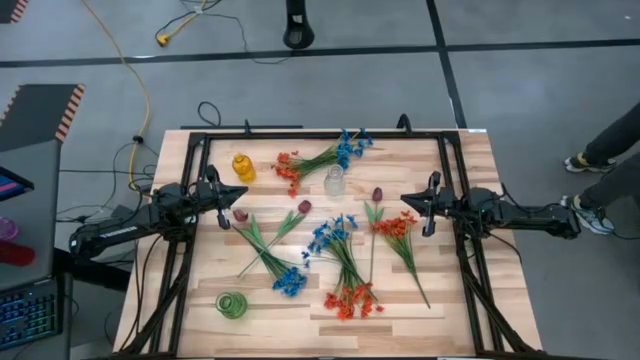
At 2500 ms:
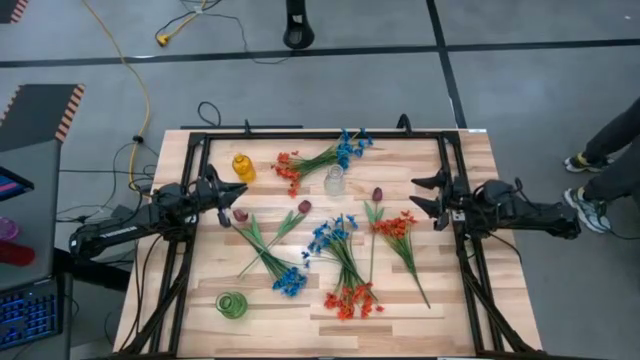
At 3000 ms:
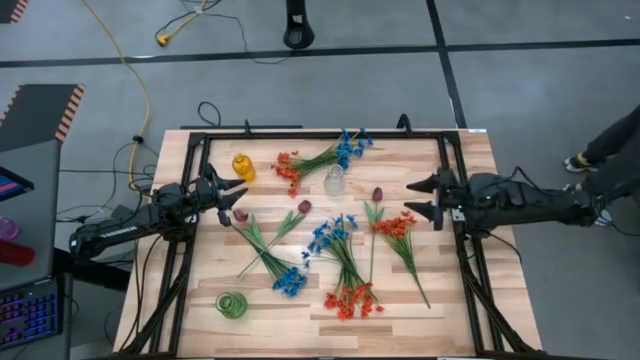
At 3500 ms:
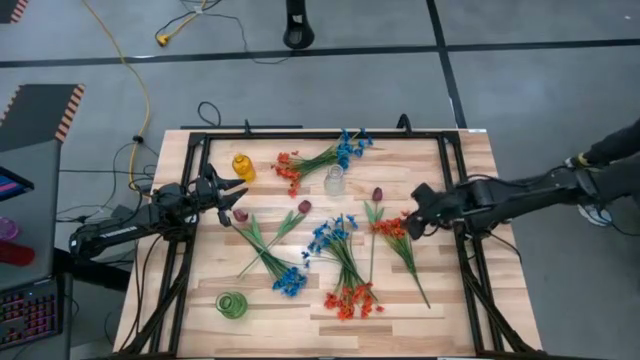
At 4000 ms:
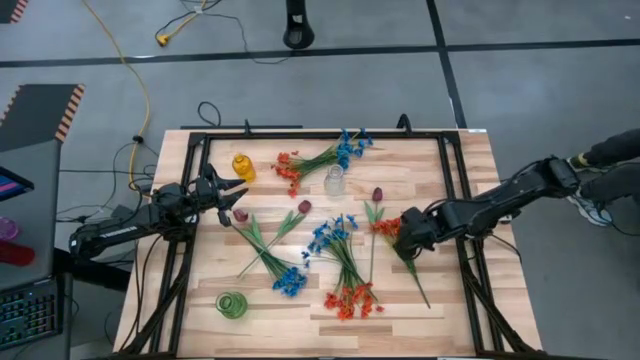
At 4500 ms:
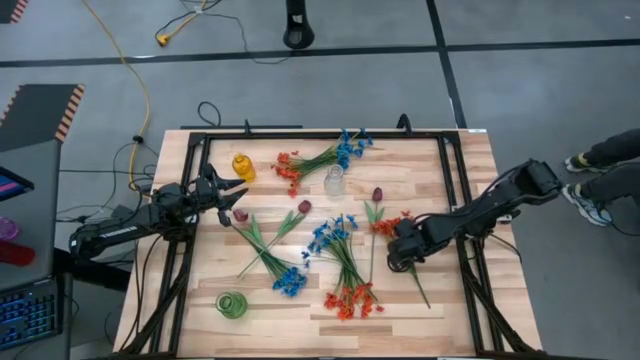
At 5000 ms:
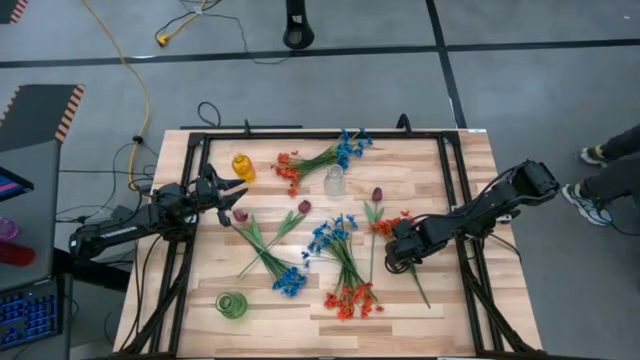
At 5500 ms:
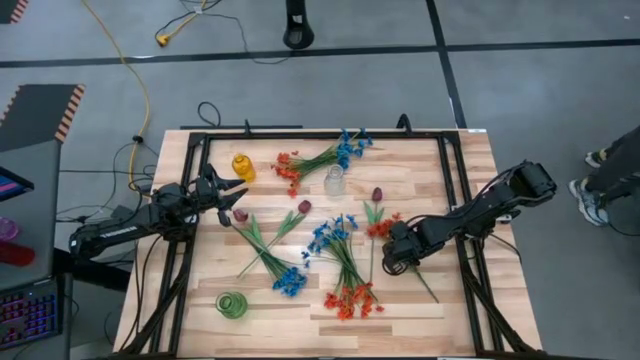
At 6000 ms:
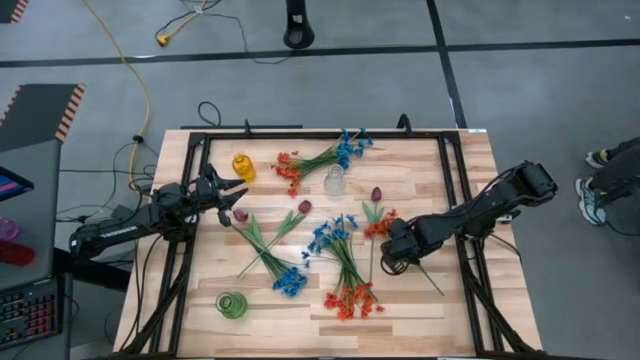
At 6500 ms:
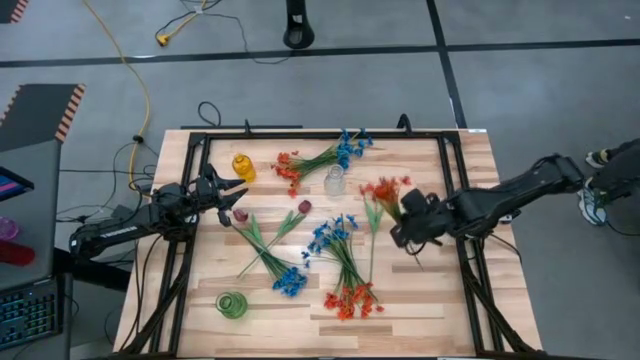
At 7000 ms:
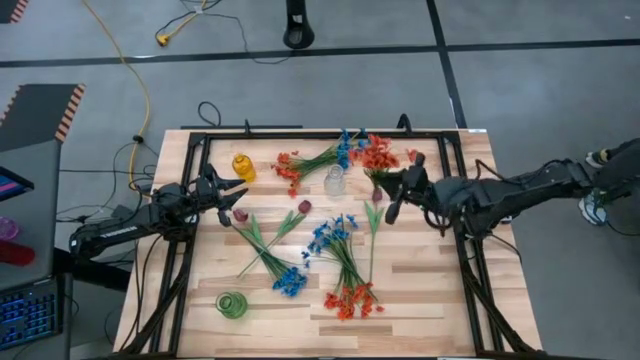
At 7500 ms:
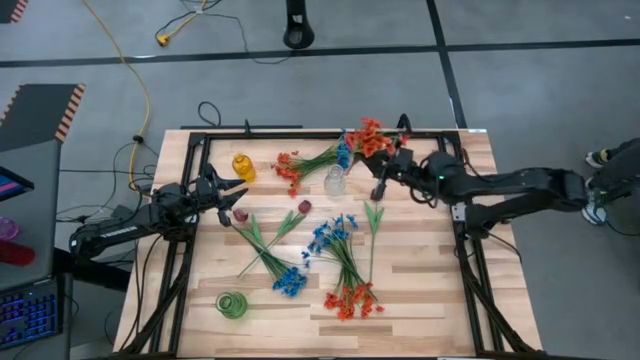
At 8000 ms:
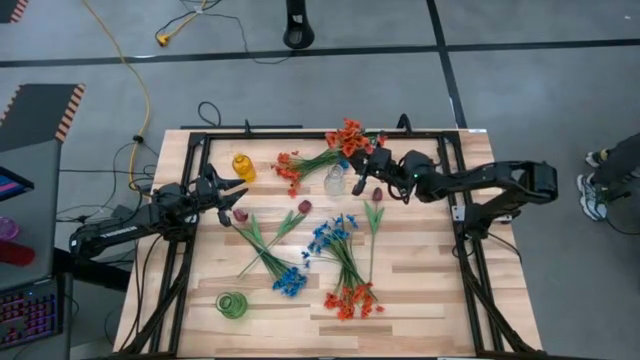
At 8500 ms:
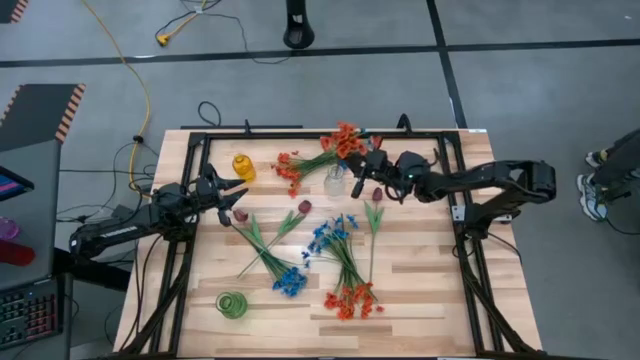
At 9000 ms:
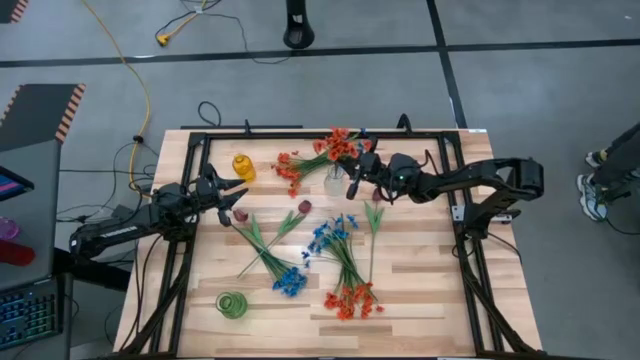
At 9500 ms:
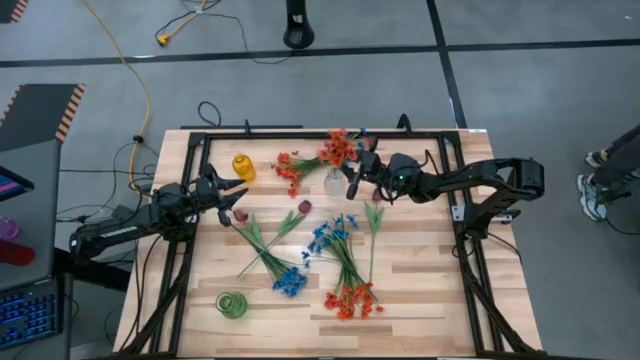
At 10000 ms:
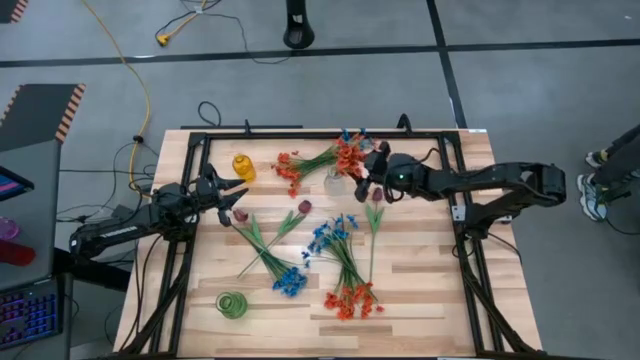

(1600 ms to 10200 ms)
Task: Sort flowers into vase by color
Put the right orange flowers into the transparent vase

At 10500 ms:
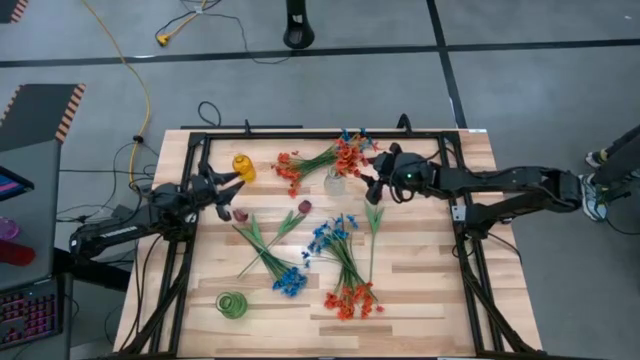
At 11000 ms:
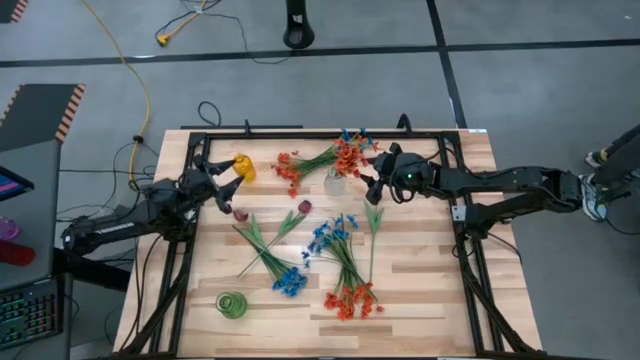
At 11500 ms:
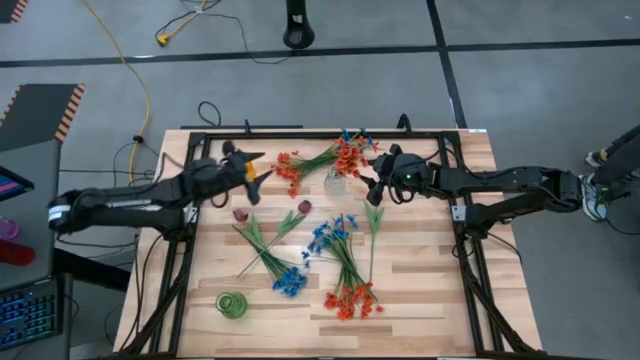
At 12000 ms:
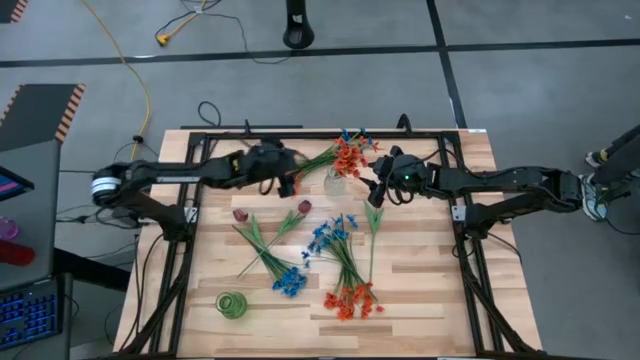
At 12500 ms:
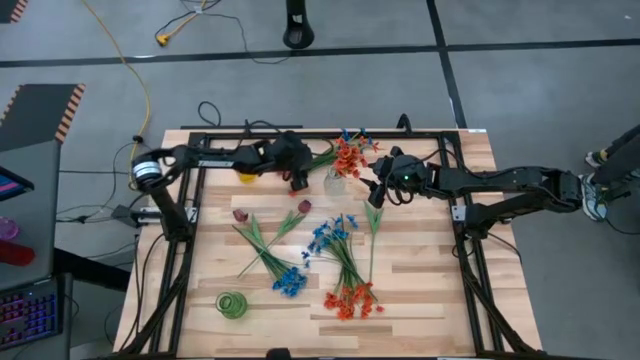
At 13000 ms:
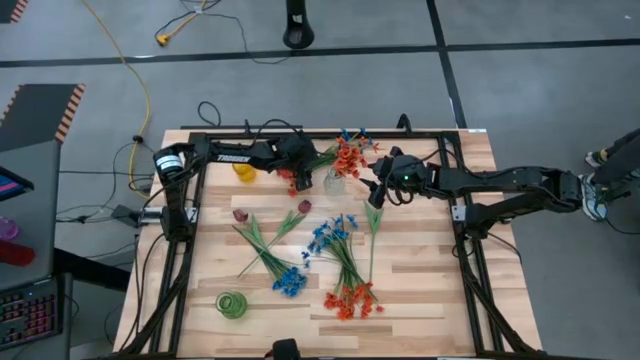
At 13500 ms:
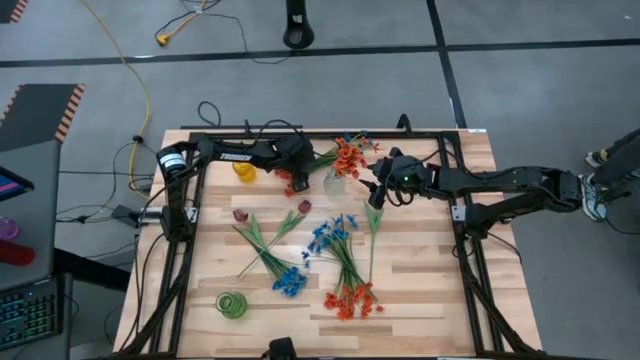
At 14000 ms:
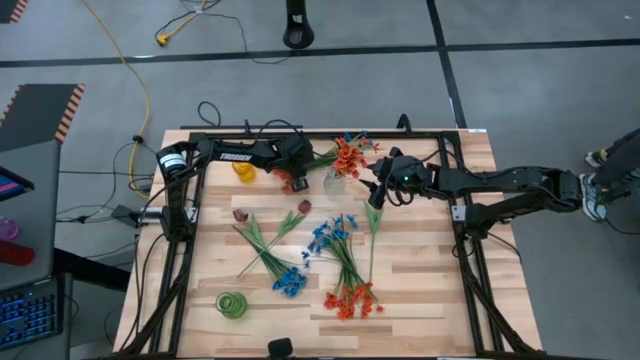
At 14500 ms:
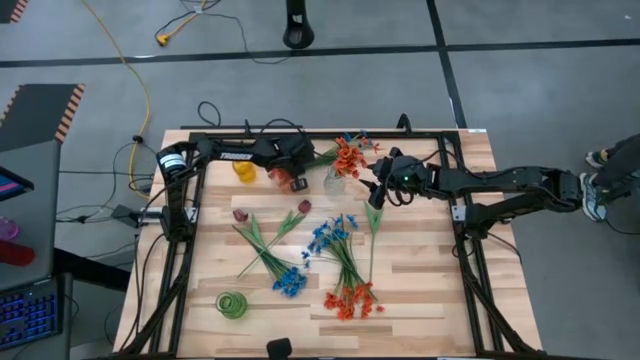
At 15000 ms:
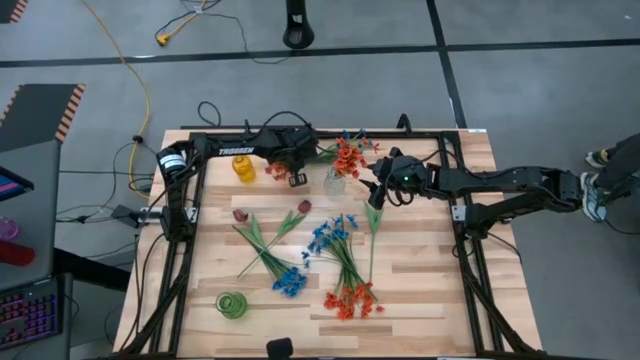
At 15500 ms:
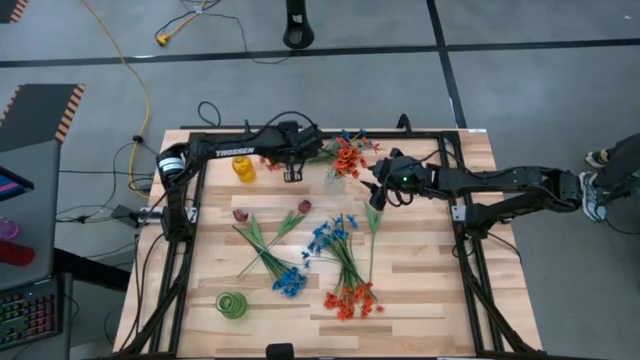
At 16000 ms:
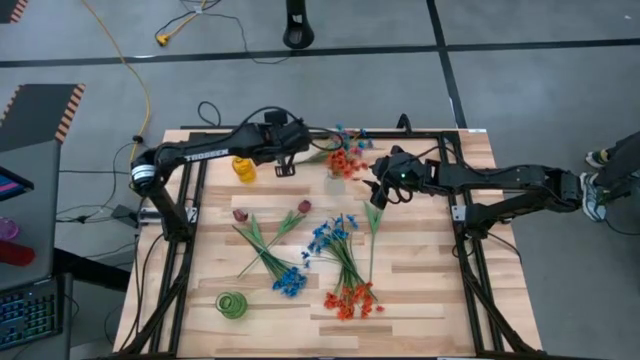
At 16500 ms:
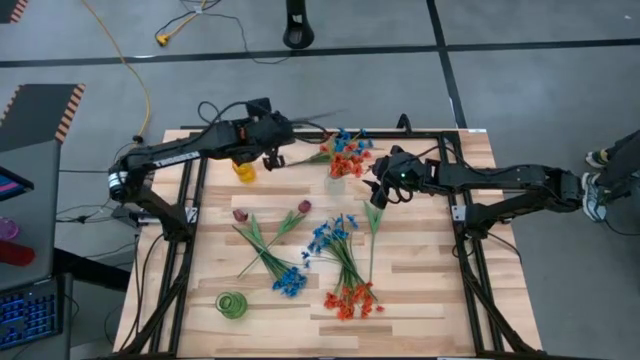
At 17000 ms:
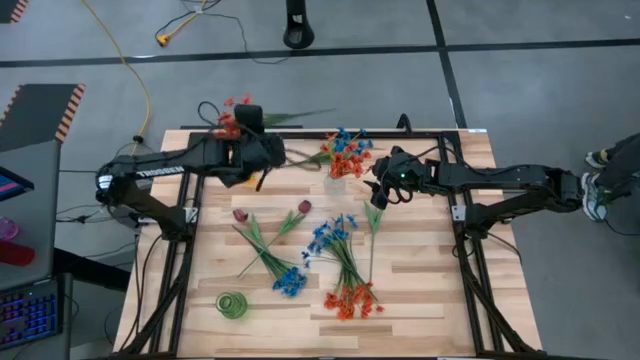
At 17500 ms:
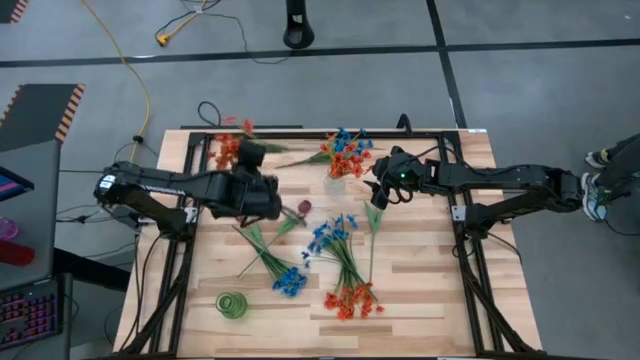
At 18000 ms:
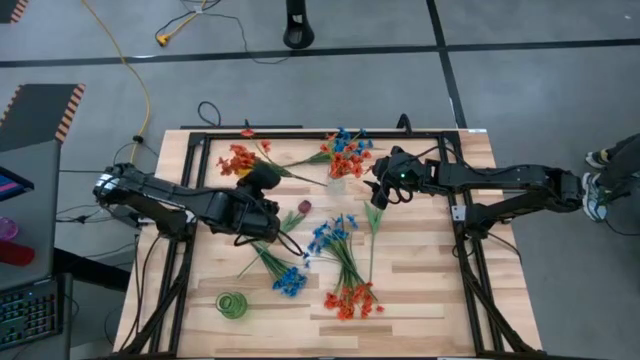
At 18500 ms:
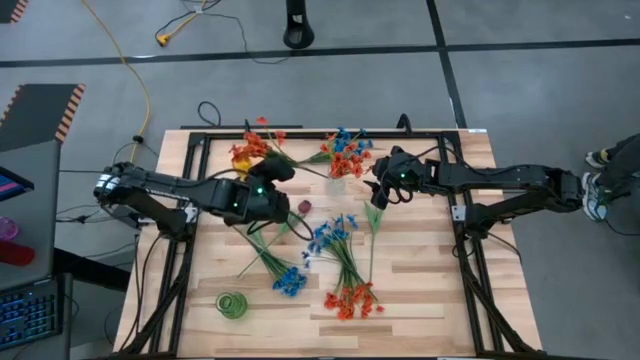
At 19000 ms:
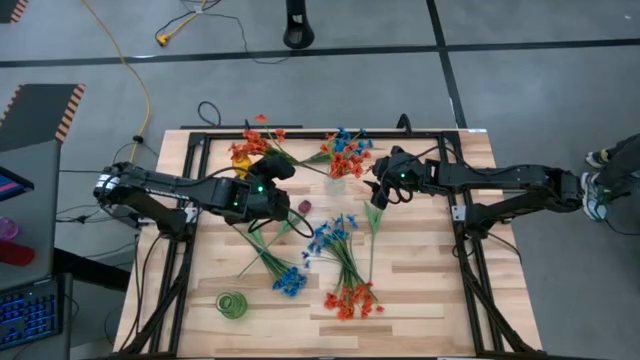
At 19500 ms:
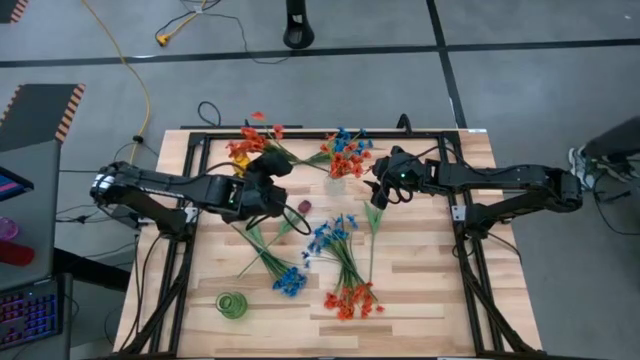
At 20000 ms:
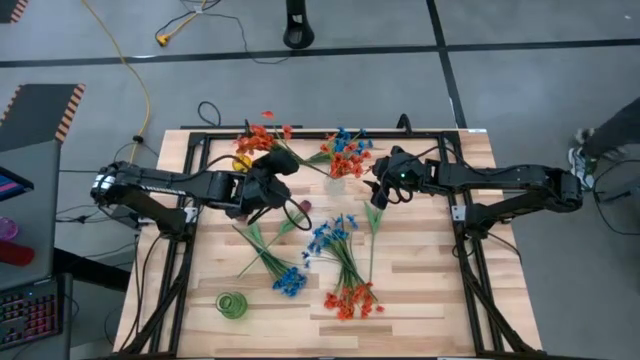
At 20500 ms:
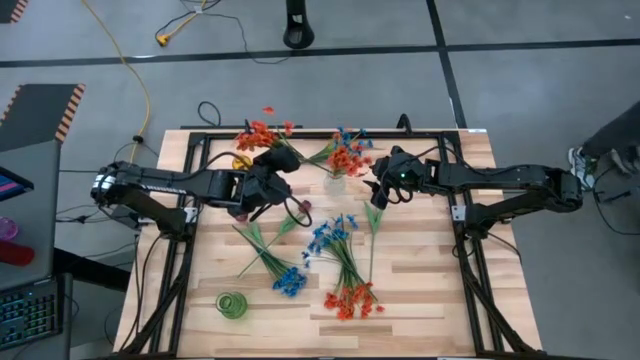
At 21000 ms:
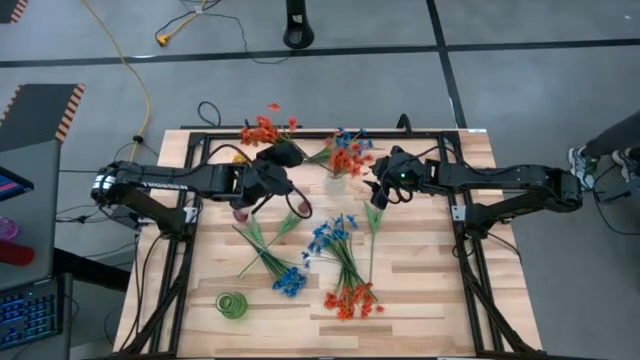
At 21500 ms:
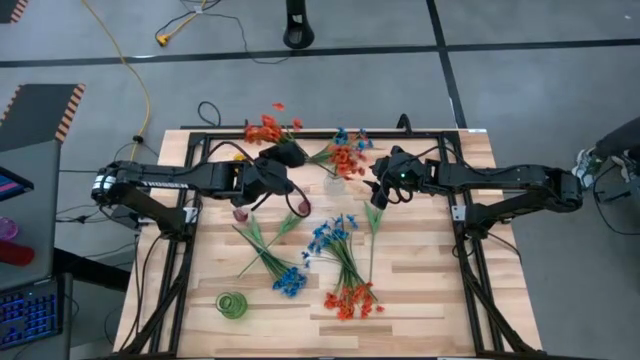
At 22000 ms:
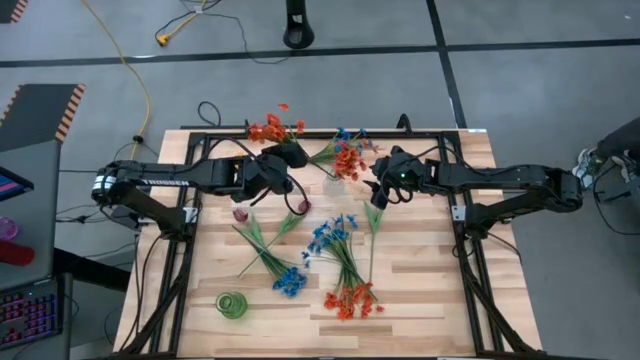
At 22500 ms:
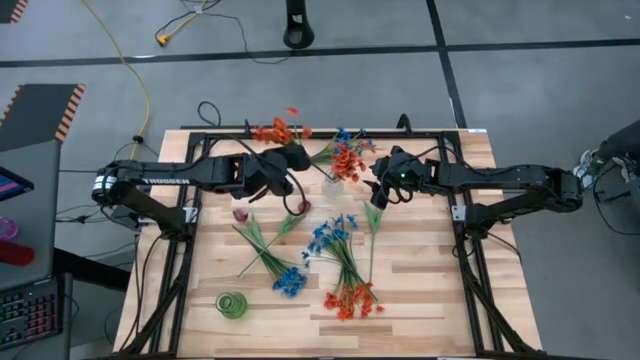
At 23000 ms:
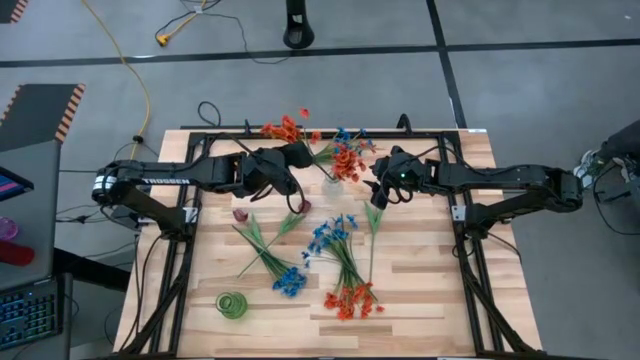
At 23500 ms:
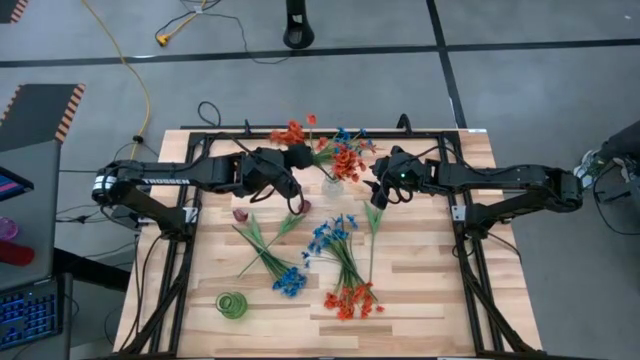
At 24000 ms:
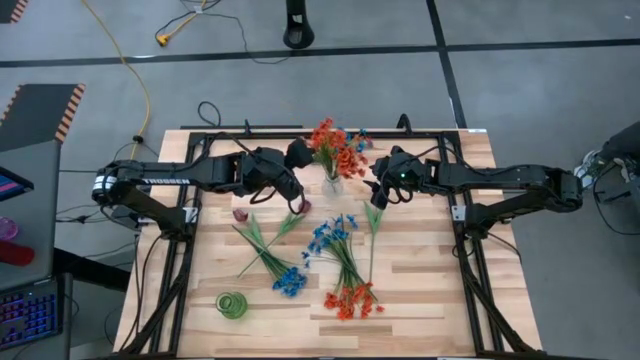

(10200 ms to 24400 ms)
Put the top orange flowers into the transparent vase
